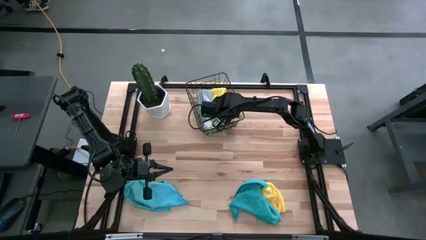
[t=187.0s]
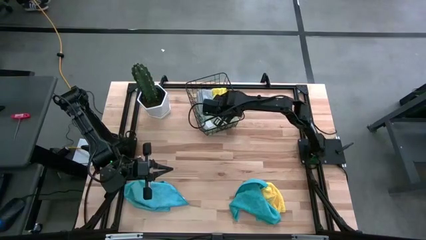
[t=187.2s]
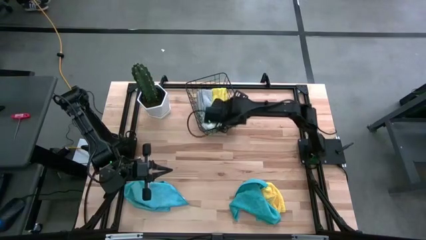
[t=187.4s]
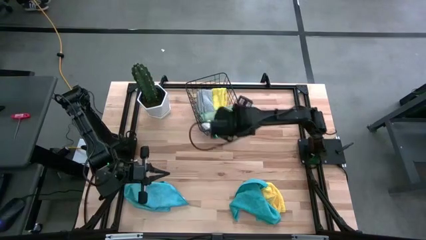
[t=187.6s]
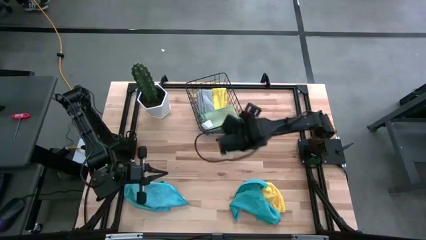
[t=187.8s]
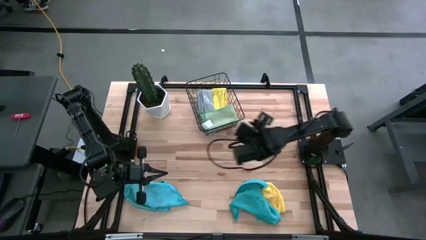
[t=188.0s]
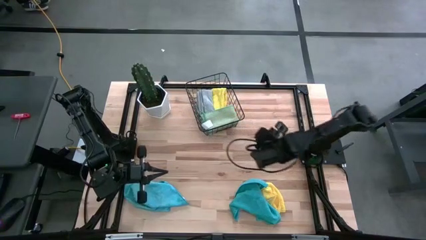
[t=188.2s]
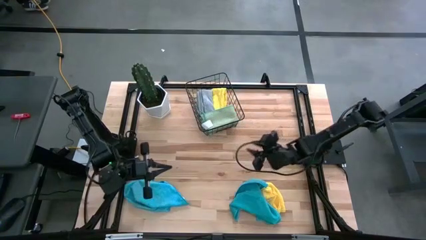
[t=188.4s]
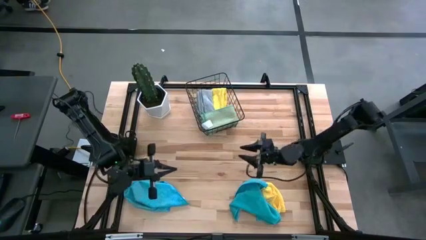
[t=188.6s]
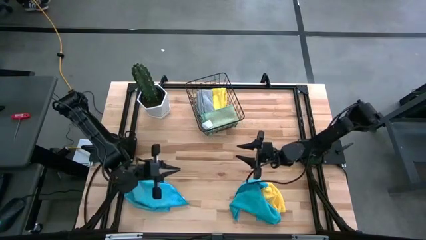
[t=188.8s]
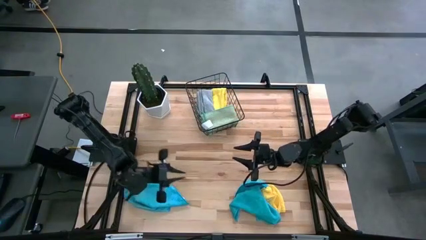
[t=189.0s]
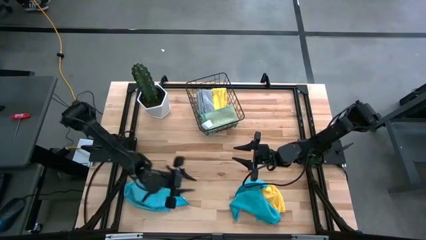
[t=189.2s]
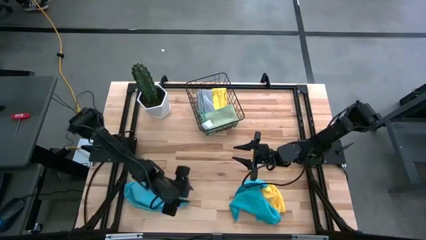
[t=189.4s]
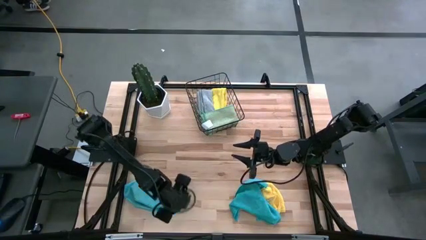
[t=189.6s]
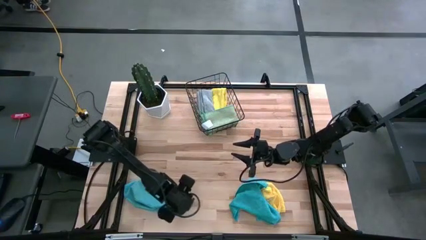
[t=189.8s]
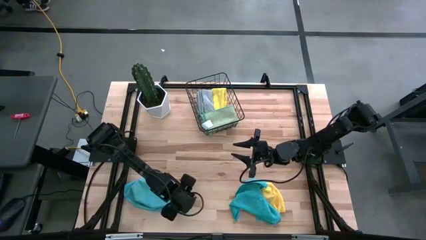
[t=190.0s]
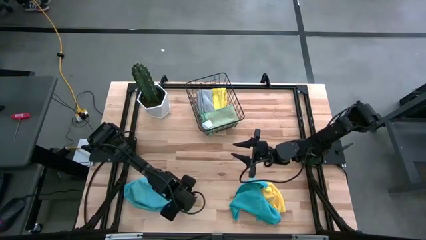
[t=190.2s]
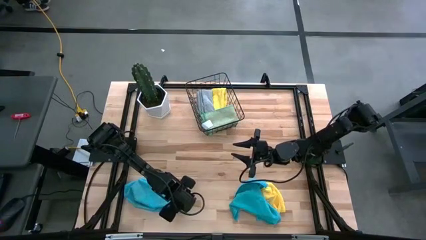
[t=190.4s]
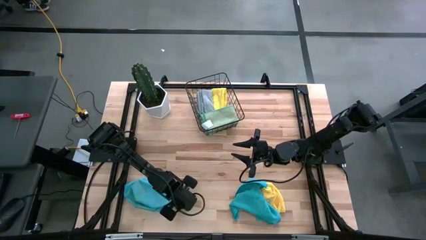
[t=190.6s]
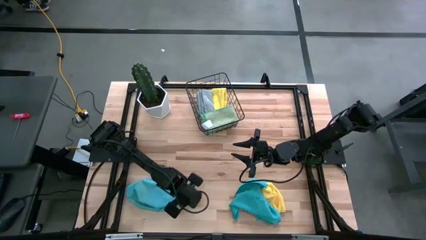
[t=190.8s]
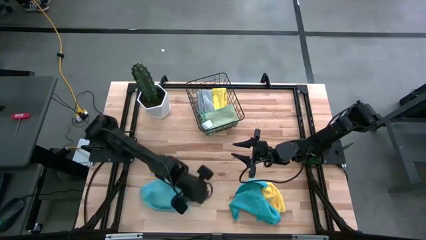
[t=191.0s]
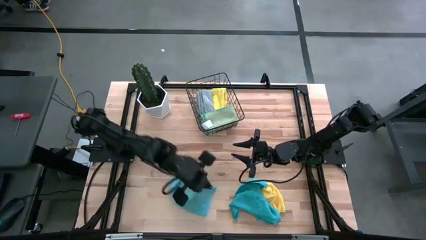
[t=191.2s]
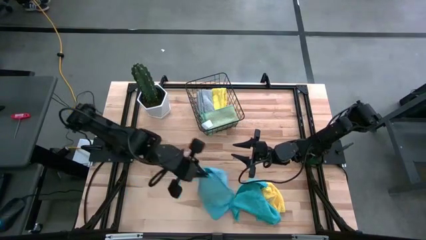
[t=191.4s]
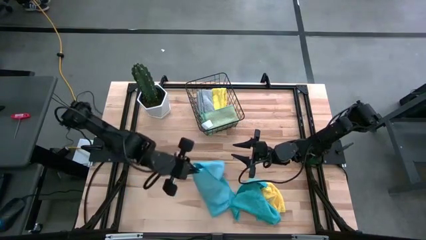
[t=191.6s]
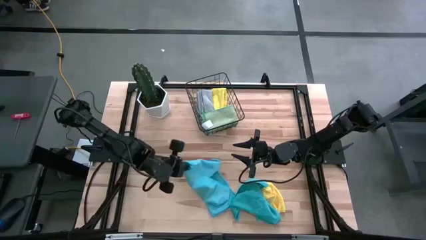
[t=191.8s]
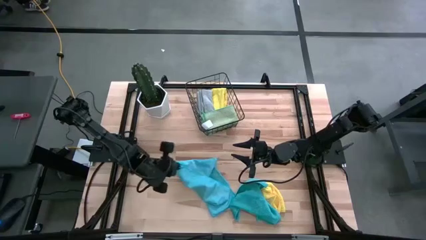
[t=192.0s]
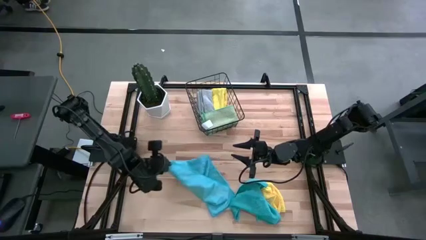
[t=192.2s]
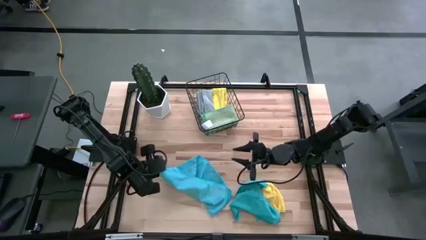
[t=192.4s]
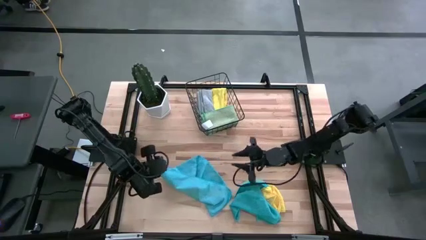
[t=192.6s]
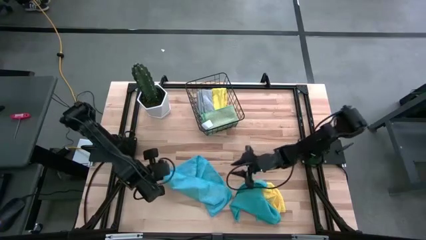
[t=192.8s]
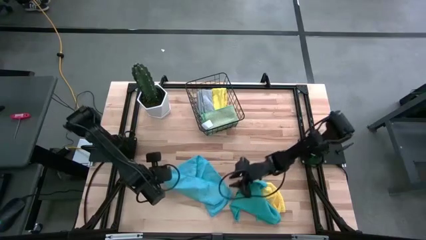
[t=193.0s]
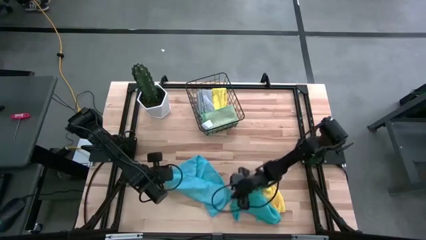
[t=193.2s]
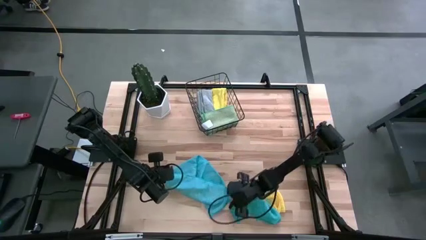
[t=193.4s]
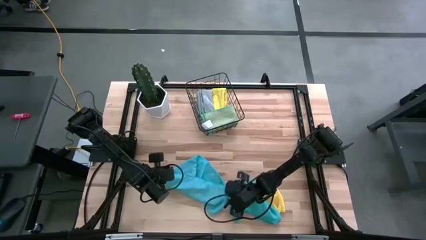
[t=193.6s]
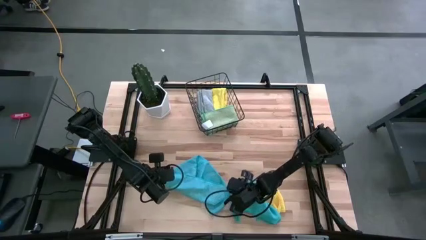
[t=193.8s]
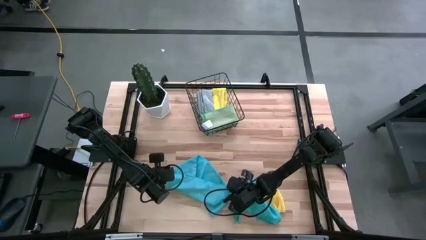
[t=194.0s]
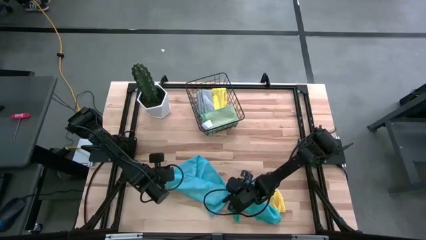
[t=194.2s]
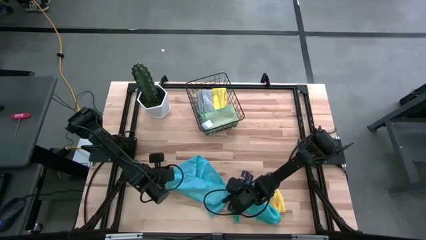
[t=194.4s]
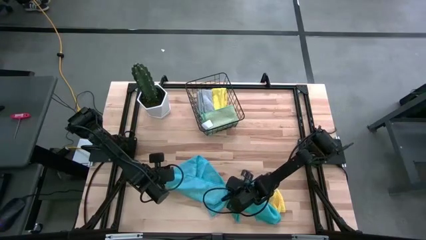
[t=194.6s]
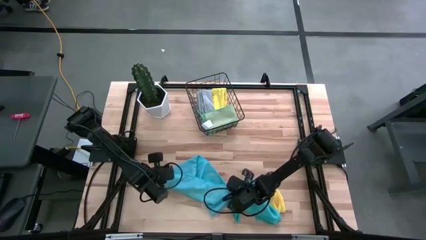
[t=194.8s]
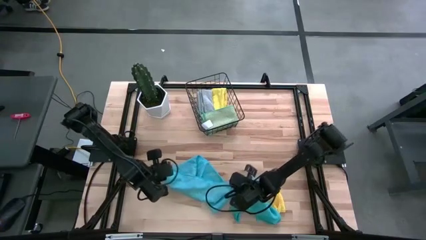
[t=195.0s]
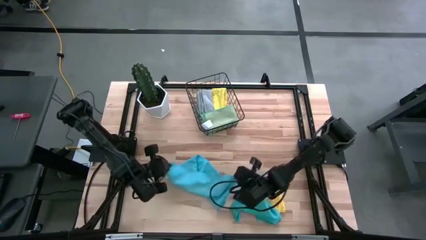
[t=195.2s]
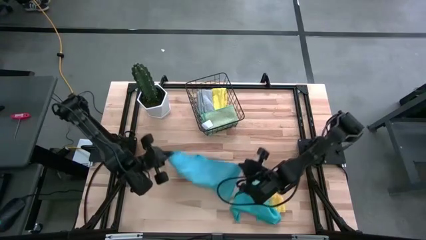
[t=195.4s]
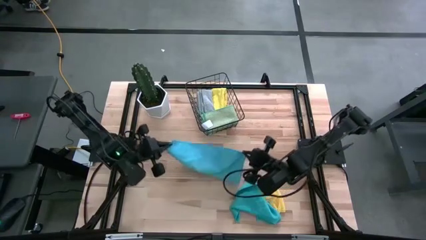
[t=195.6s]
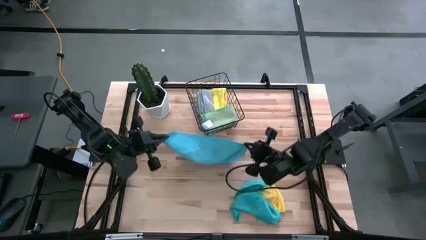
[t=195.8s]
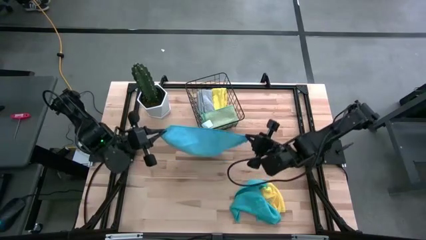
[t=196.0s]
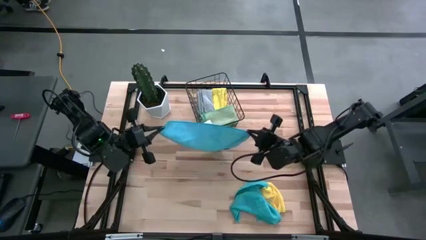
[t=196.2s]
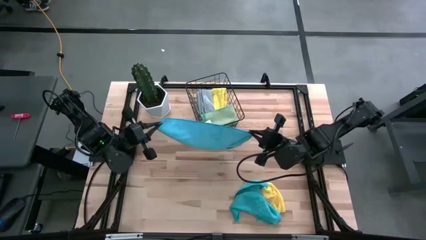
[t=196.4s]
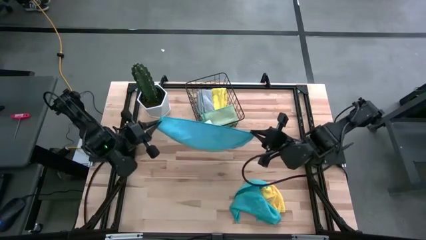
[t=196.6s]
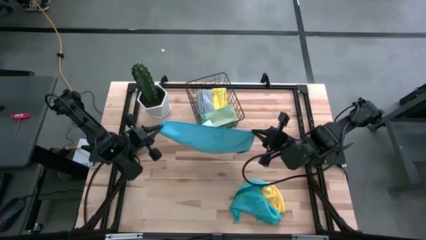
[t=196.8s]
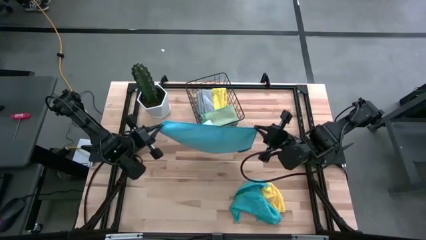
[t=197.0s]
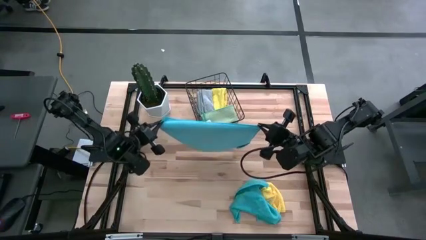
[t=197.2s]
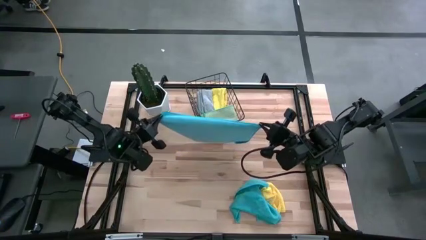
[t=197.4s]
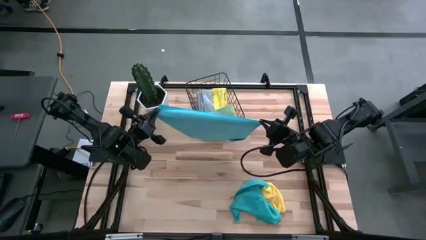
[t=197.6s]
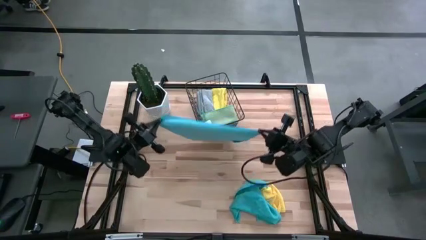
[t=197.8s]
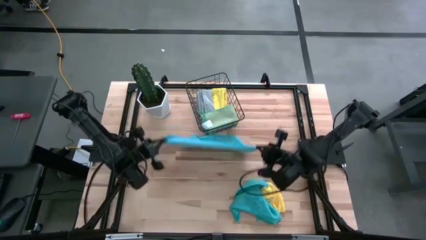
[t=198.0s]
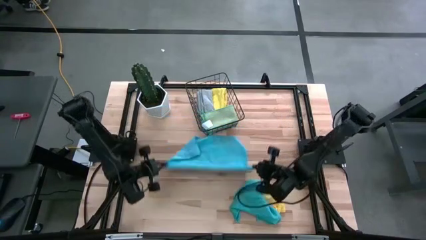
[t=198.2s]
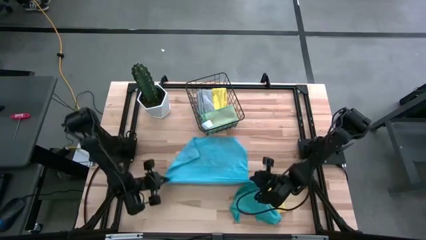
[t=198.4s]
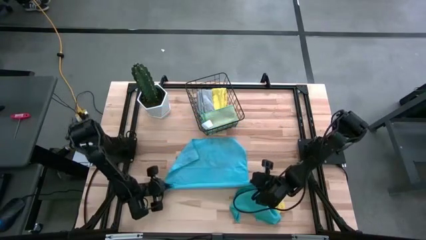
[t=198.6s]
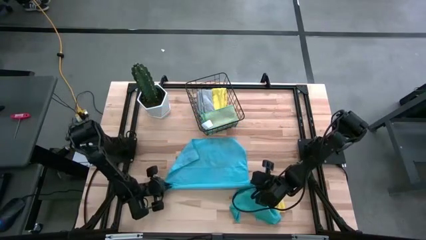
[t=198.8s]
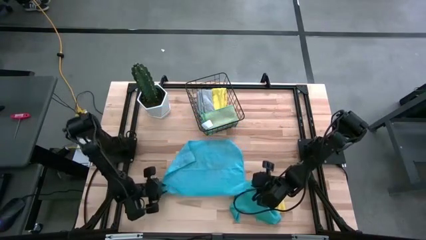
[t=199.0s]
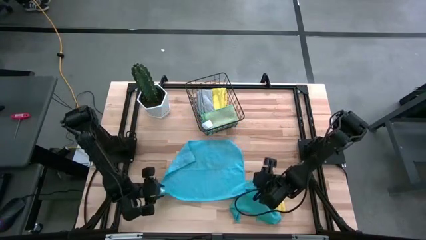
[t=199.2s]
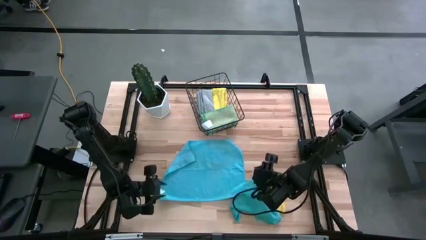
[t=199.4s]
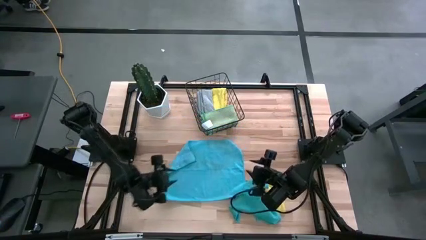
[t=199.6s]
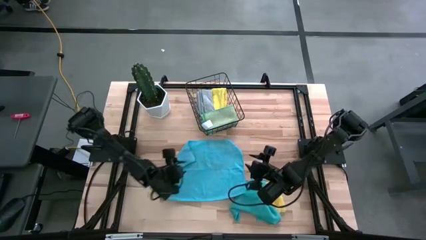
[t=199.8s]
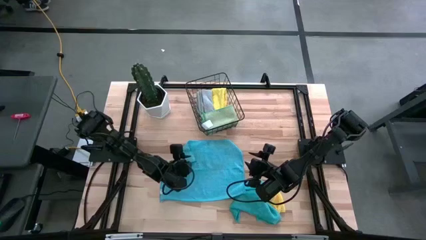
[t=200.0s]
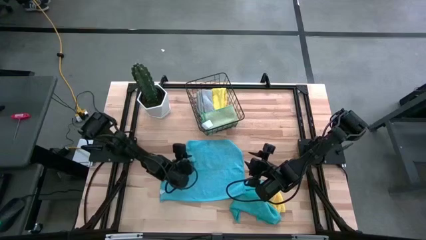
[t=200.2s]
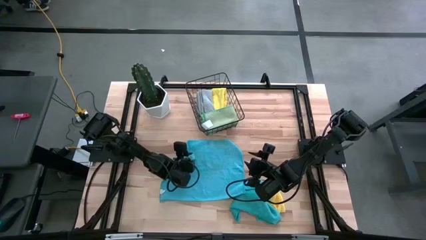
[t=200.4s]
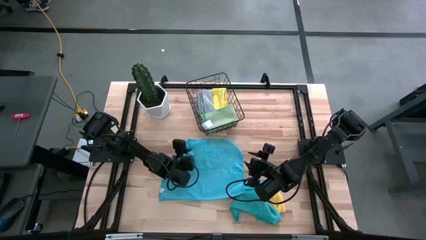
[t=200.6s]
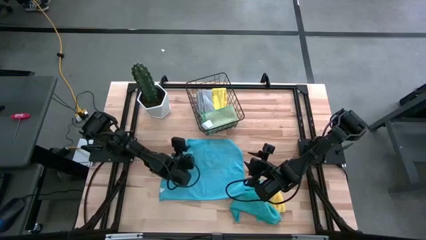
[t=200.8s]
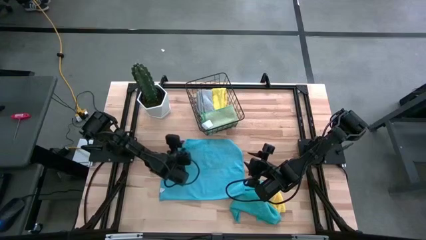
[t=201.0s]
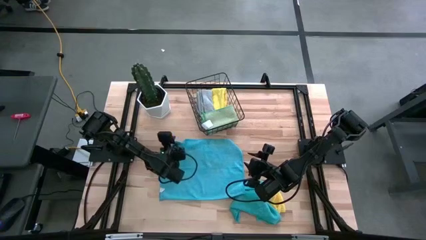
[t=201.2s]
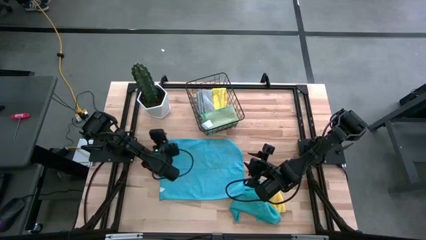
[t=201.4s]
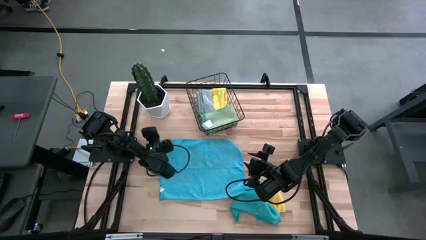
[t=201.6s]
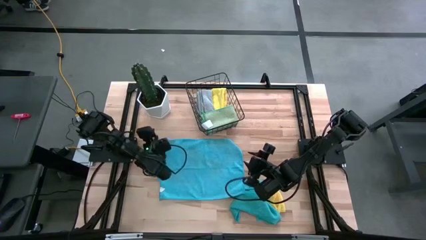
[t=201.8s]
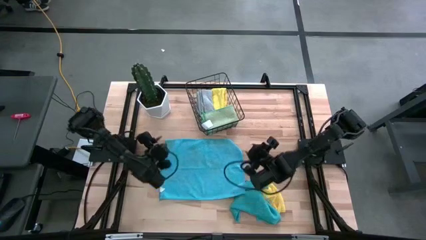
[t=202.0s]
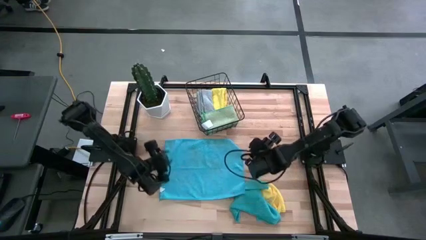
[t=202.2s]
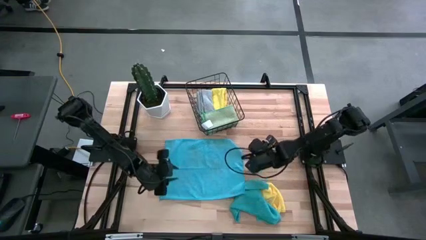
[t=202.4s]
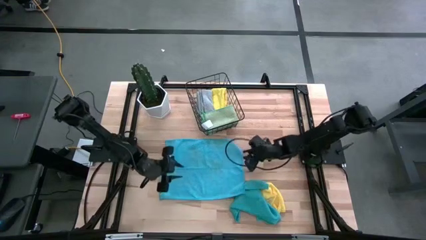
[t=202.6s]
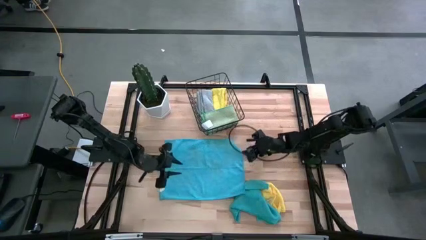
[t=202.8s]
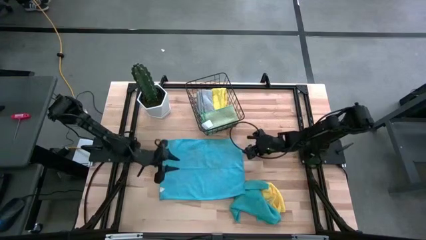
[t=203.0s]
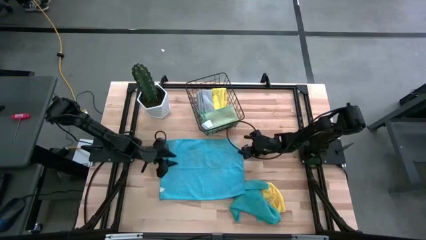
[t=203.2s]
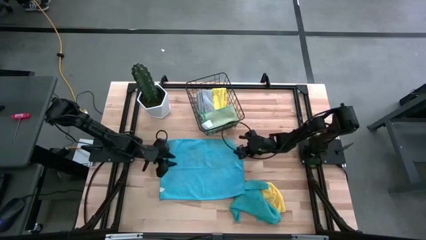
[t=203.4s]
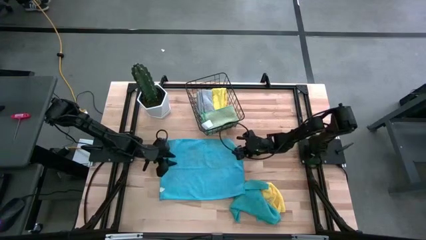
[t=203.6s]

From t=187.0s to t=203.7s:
Task: Fold microfiber towels
Fold the left blue microfiber cloth

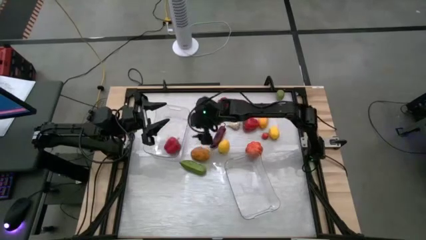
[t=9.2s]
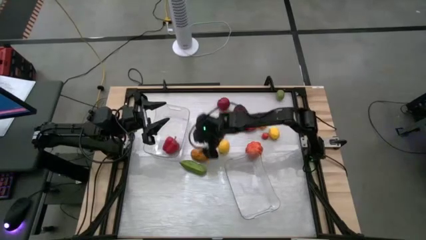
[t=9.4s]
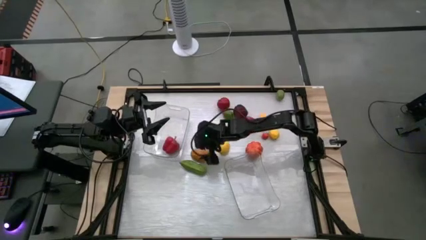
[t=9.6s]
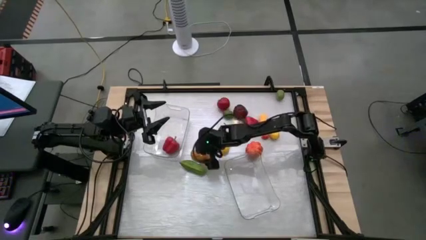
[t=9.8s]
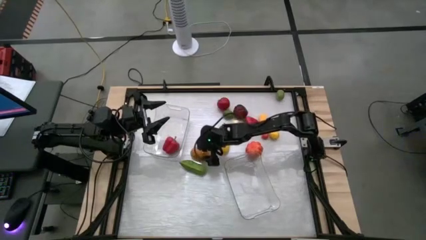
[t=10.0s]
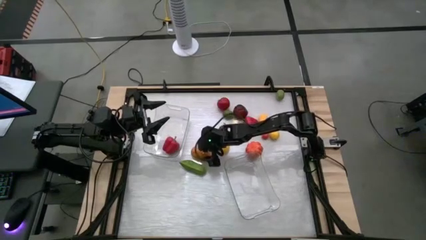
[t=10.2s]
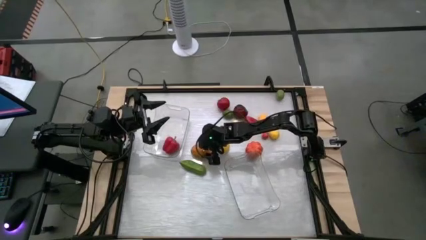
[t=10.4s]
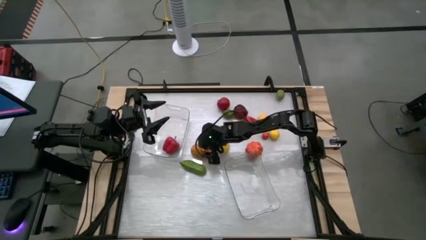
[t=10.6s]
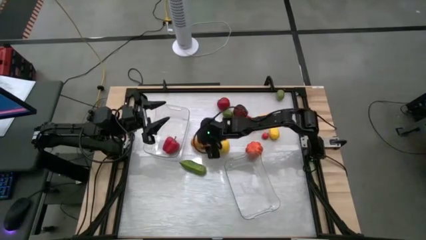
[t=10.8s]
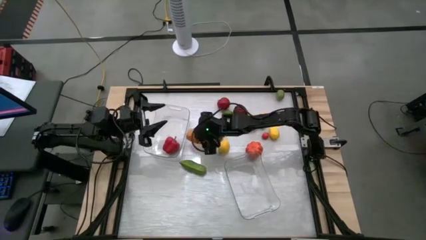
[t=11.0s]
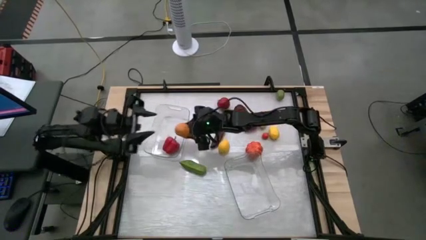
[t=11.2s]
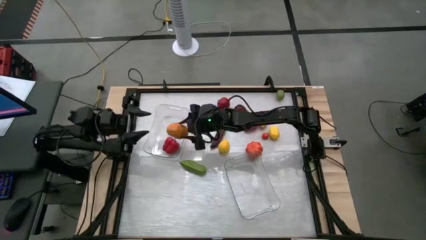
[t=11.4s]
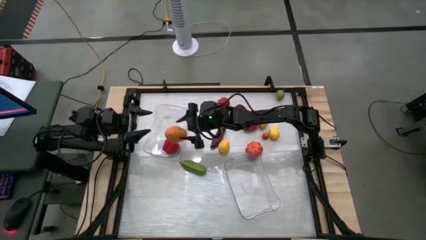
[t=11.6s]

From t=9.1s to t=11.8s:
Task: Sort produce into baskets
Put the brown potato into the left transparent bin
